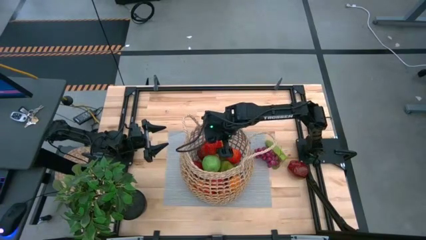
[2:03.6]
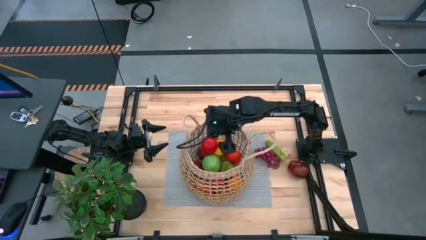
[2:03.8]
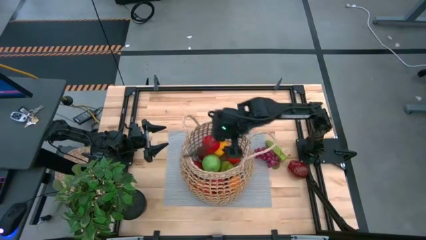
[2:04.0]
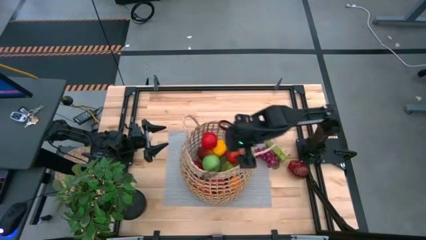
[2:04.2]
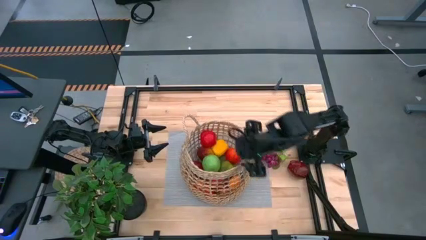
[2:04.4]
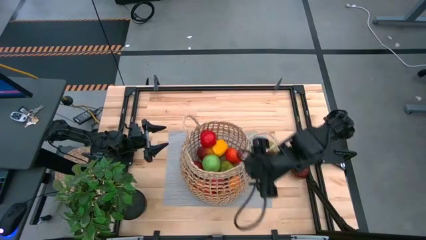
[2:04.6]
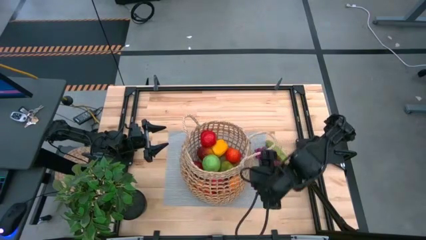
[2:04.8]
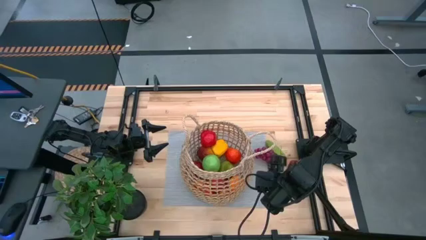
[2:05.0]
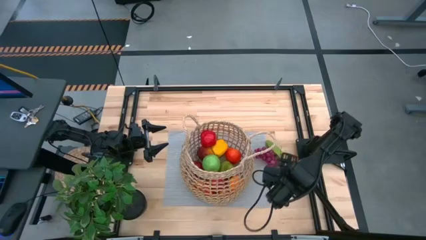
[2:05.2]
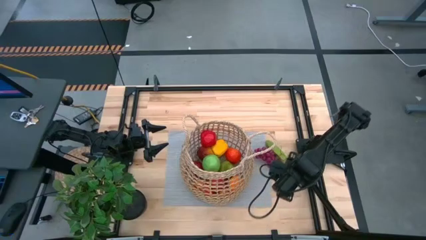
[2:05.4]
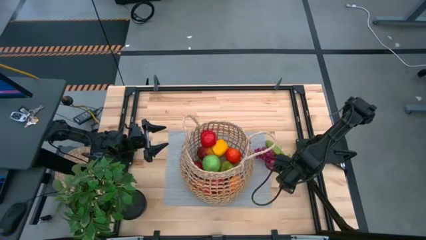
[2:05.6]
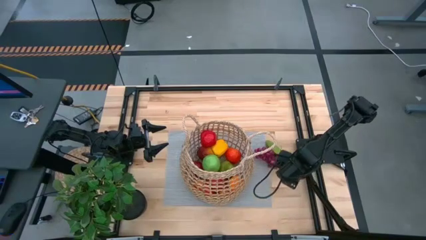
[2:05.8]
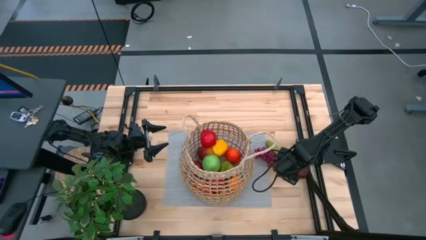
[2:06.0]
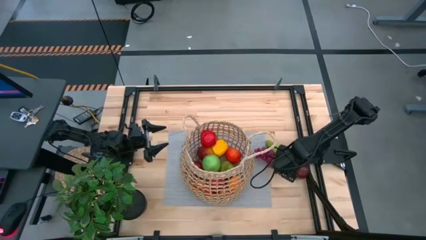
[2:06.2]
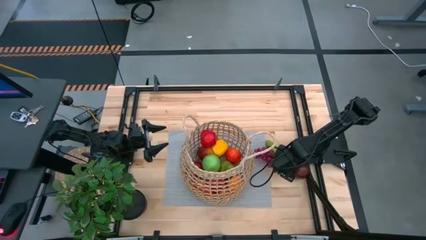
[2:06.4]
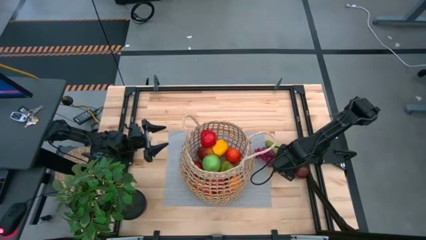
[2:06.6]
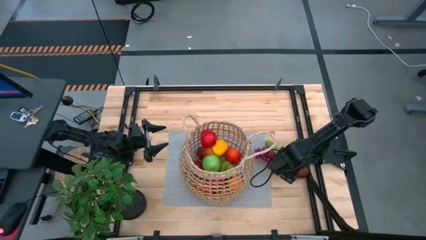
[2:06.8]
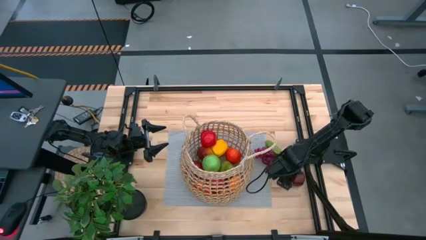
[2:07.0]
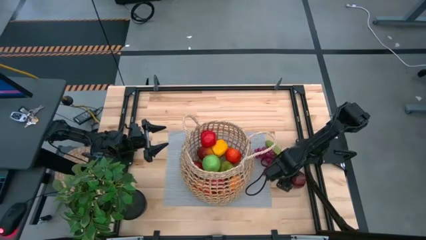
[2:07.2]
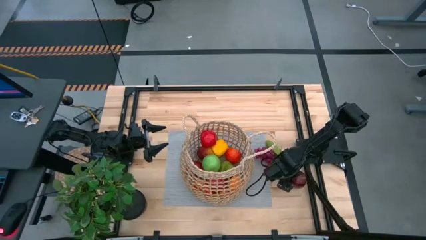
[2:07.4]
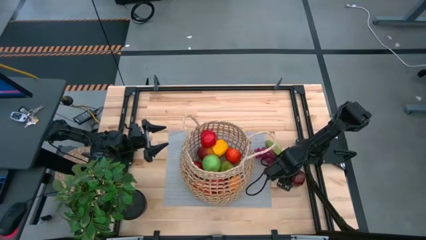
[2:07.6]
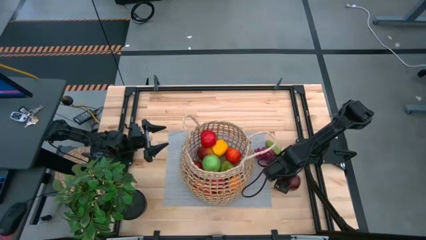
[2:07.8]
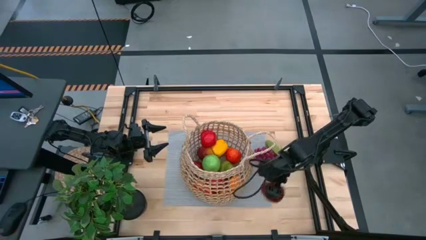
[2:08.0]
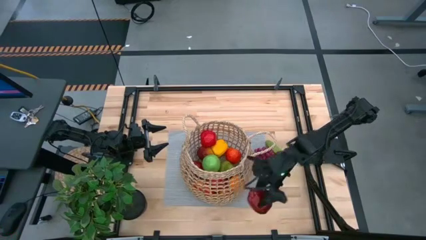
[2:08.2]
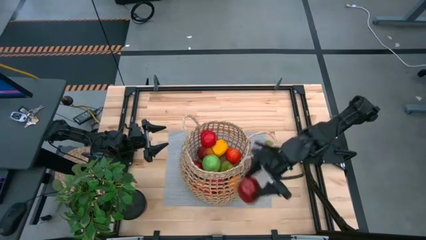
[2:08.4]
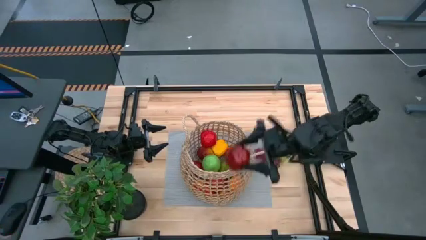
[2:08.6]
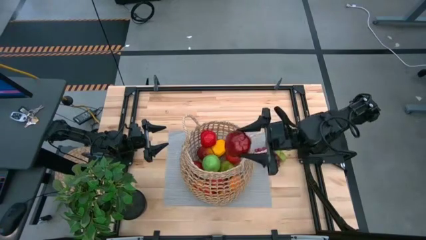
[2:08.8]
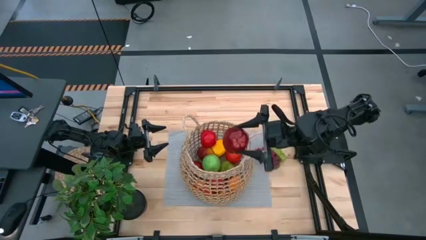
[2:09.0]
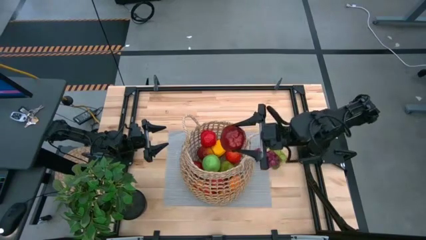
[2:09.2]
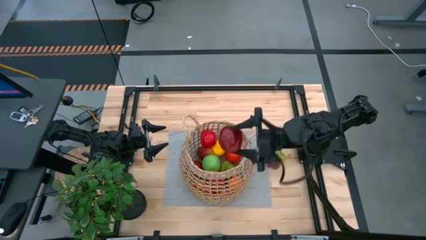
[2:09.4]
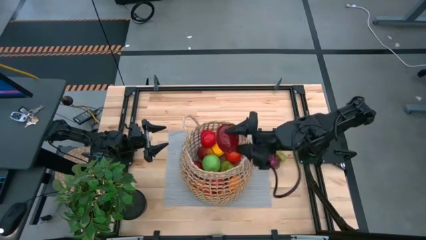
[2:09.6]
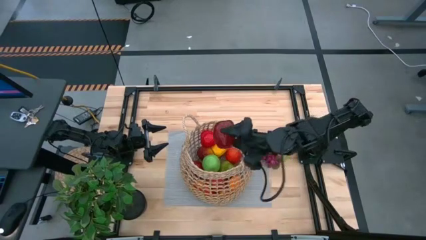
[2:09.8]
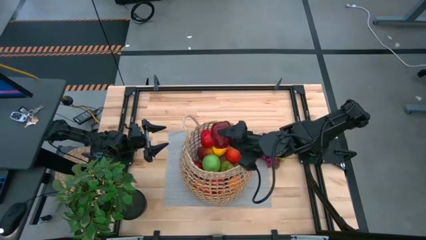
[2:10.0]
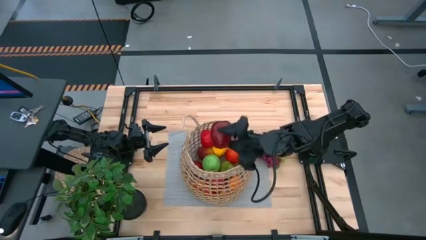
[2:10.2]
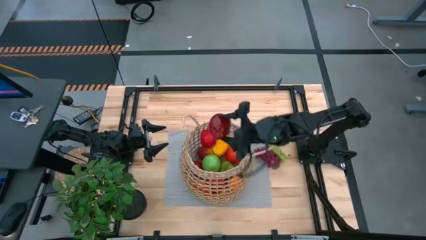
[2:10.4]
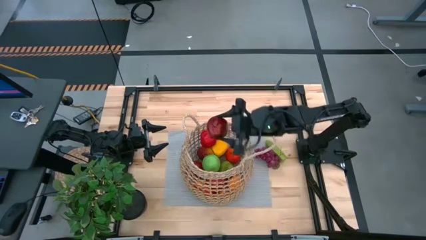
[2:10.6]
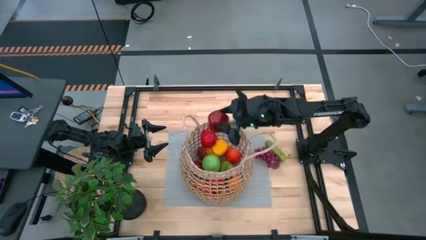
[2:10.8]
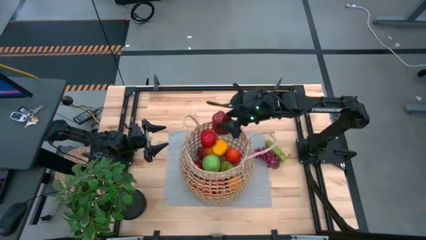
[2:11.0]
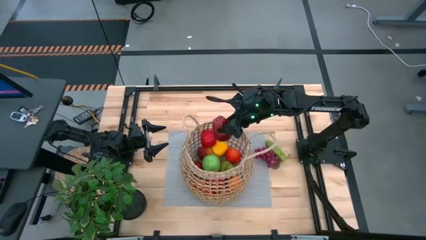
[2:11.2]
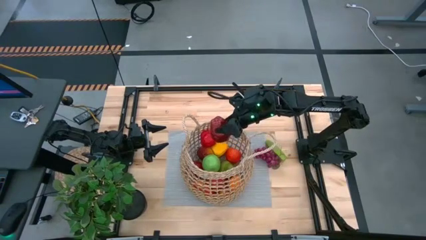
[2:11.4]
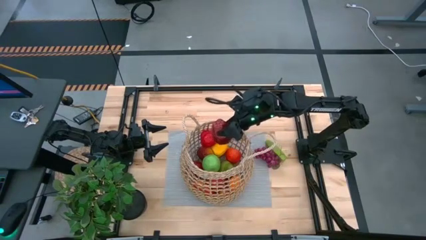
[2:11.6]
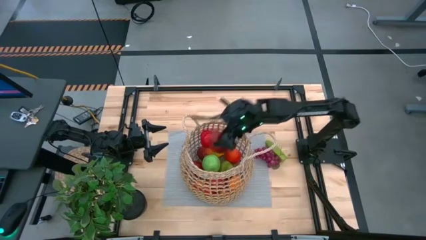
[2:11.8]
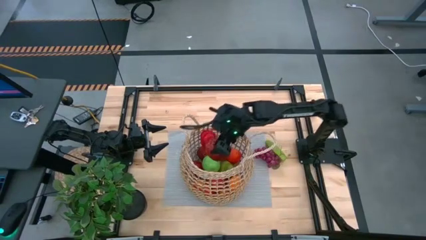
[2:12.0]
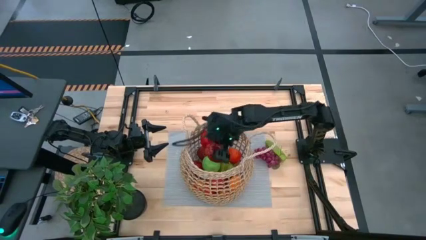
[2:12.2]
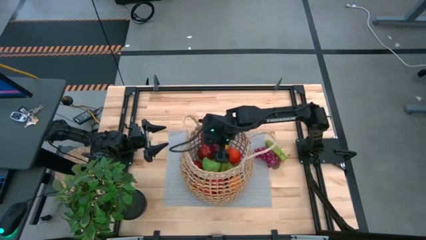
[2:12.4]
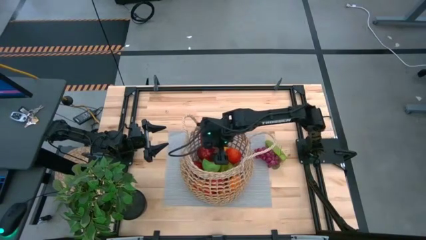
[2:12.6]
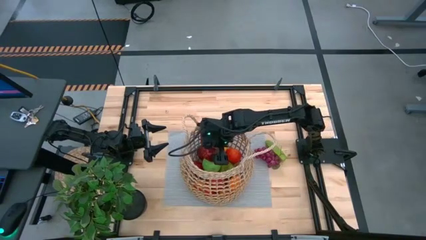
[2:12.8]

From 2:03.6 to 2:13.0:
Task: Build produce basket
Put the dark red apple into the brown basket

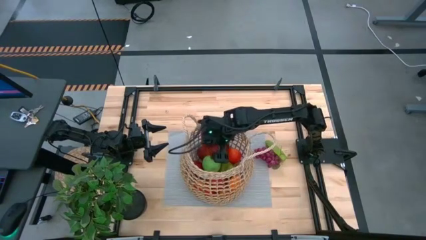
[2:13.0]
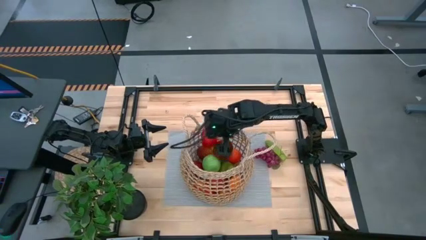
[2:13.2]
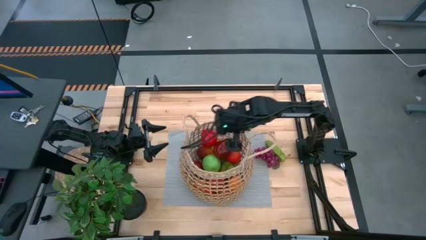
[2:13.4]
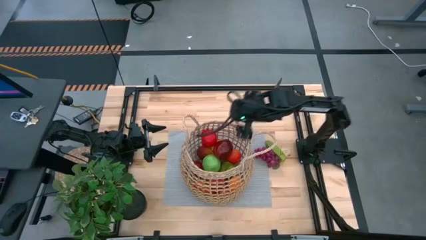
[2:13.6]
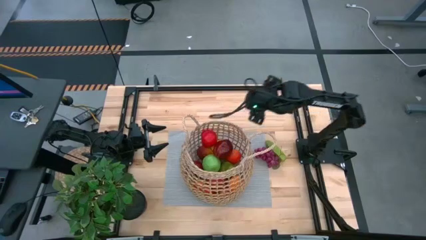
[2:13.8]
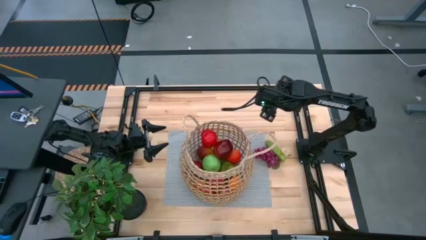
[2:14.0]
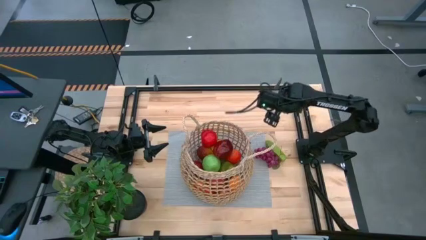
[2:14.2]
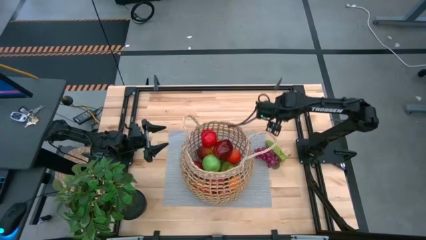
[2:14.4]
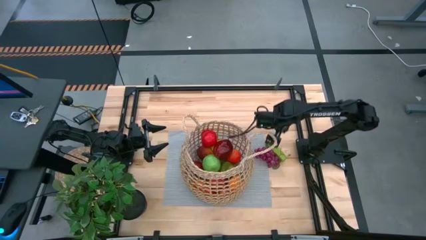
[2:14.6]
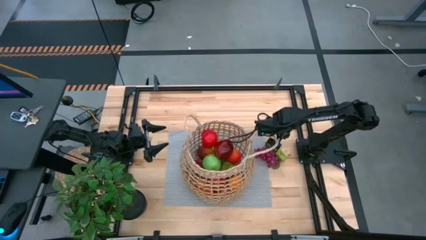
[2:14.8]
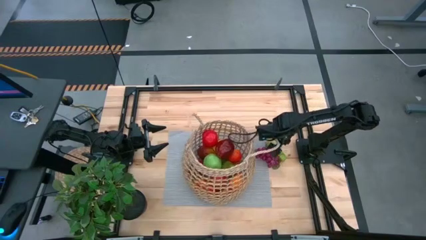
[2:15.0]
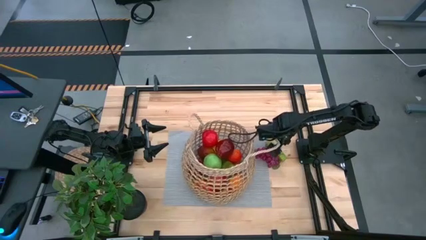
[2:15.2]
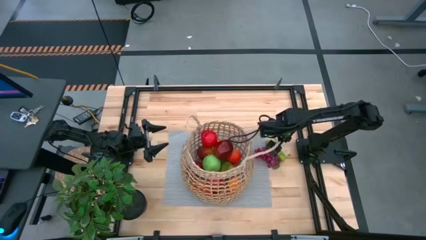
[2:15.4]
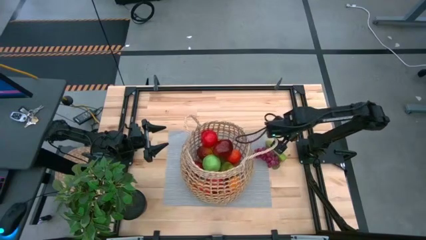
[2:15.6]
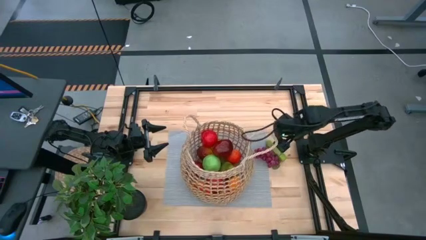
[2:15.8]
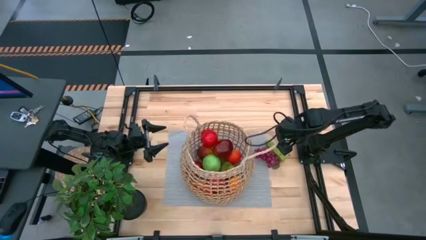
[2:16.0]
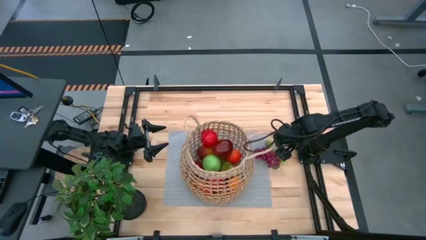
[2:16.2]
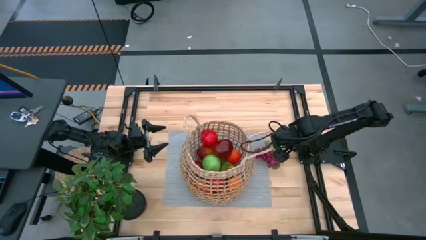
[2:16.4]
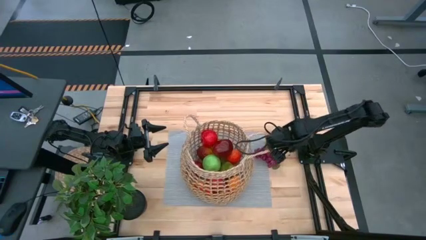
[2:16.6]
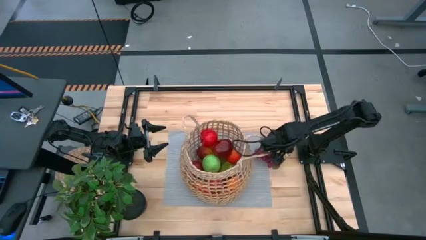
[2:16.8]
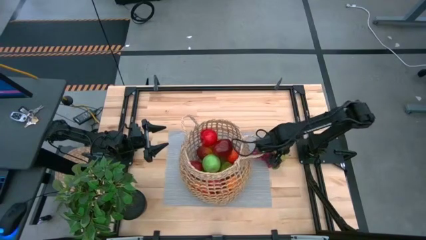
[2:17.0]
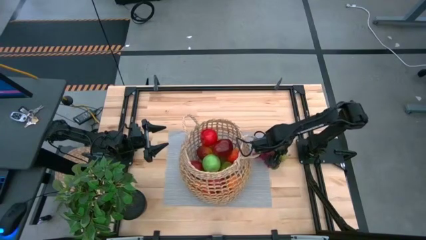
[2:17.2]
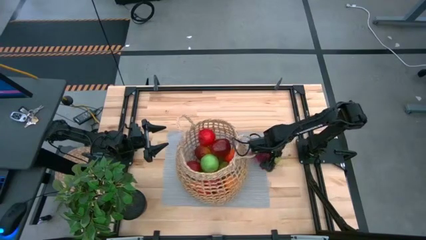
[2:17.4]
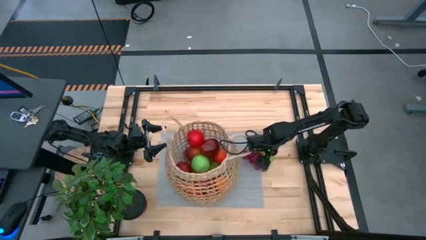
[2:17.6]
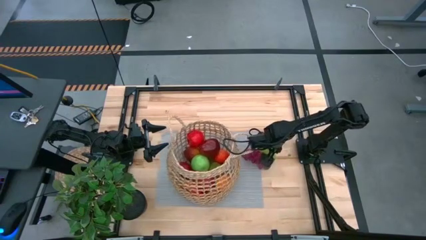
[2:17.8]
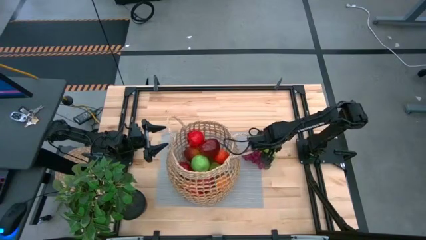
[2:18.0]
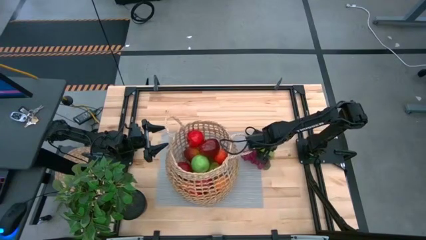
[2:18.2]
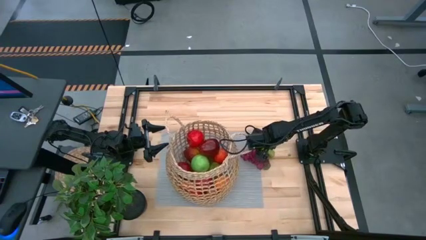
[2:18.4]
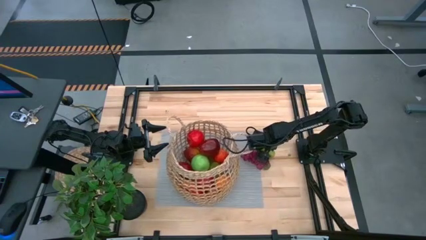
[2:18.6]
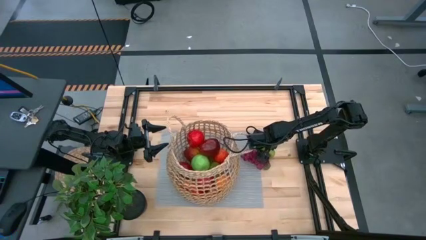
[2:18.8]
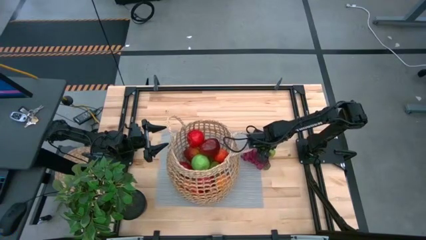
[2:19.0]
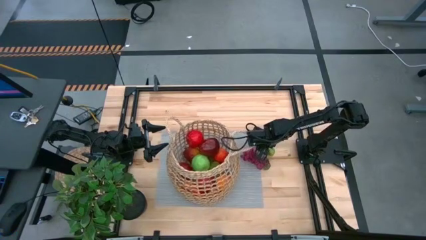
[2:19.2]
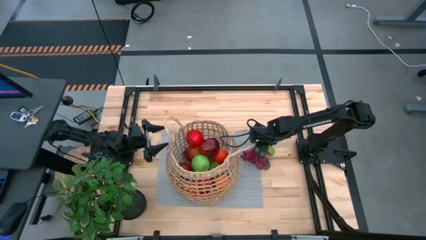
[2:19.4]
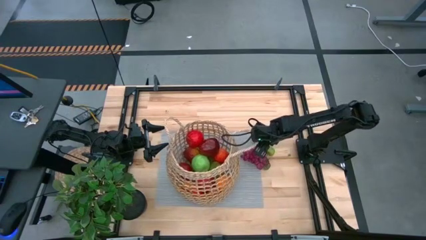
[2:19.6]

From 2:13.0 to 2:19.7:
Put the green cucumber into the brown basket
